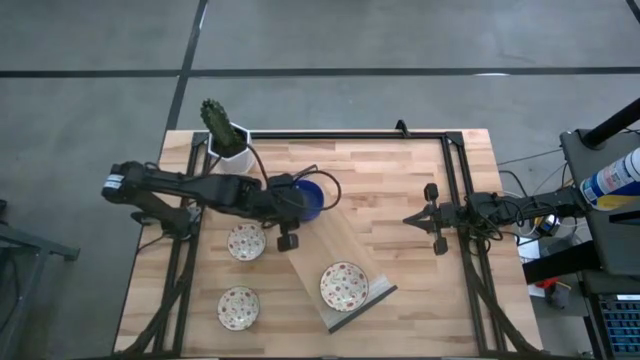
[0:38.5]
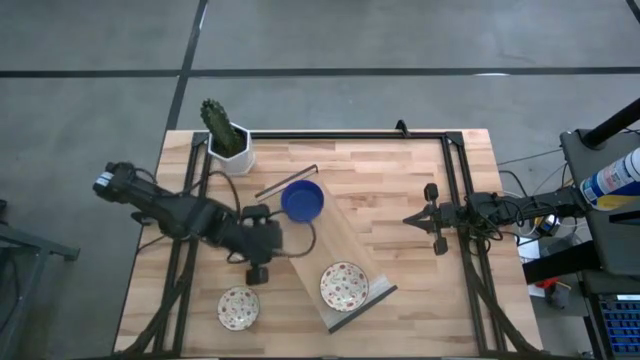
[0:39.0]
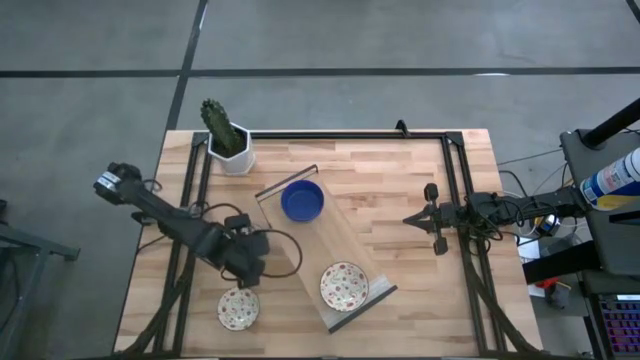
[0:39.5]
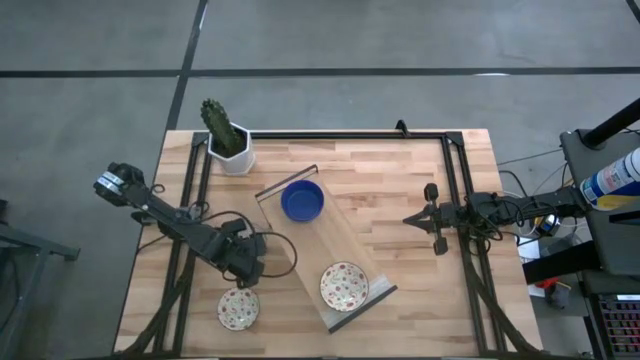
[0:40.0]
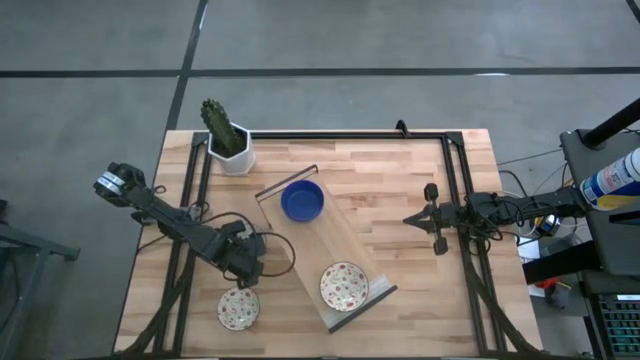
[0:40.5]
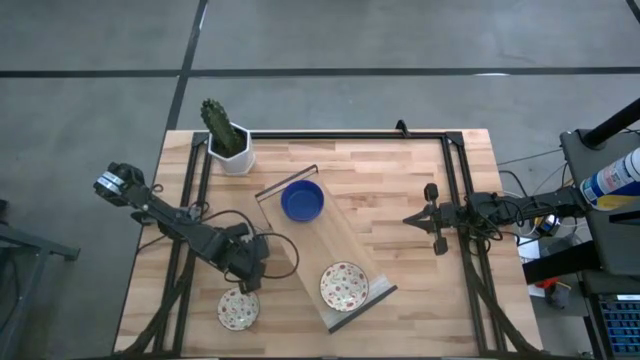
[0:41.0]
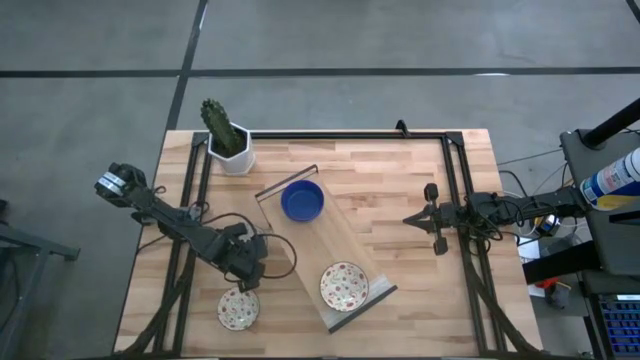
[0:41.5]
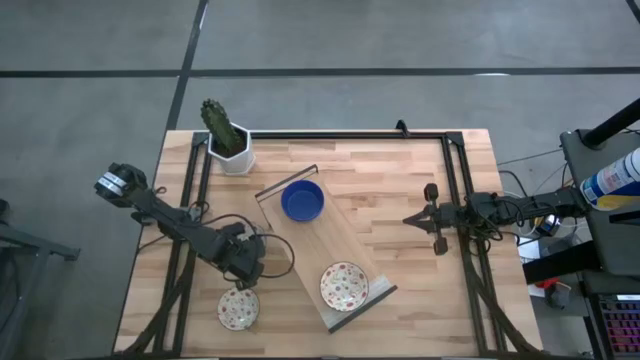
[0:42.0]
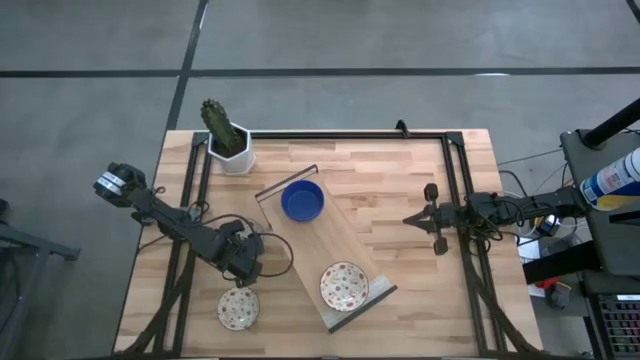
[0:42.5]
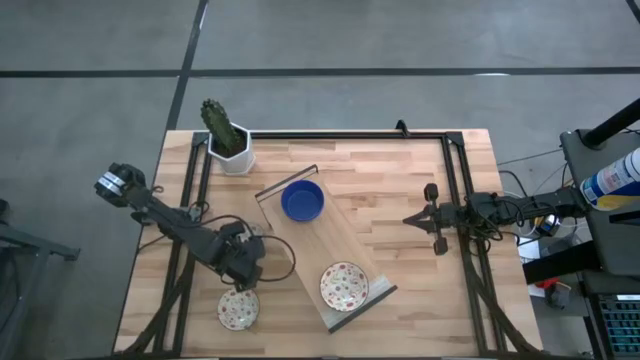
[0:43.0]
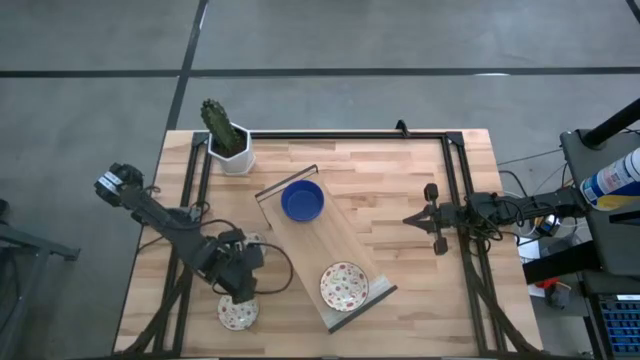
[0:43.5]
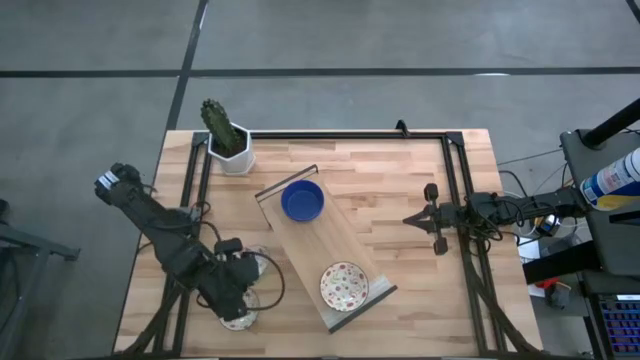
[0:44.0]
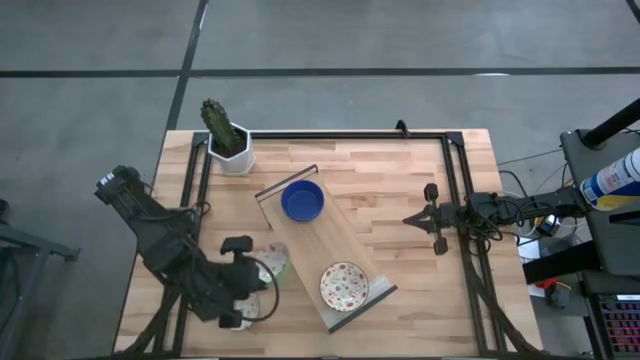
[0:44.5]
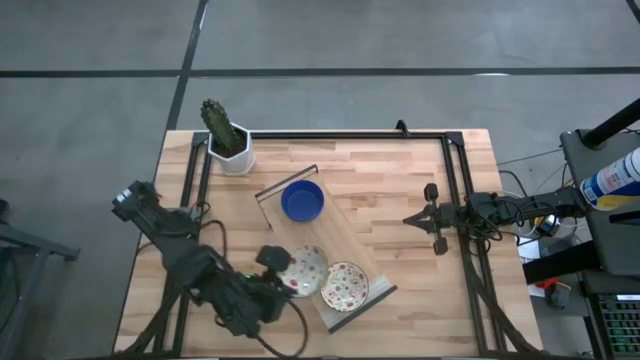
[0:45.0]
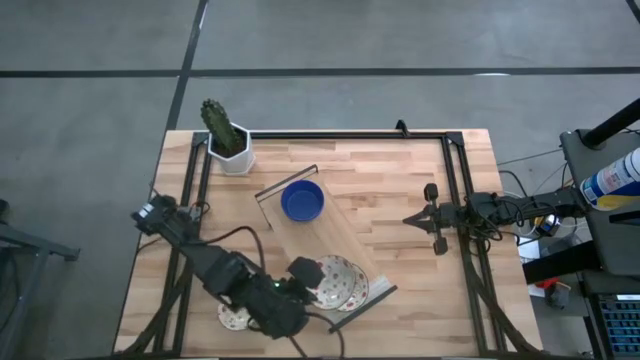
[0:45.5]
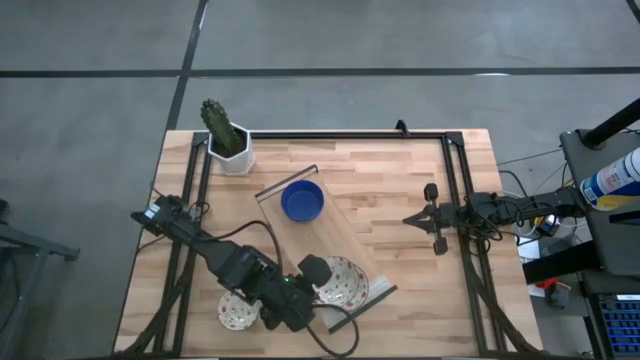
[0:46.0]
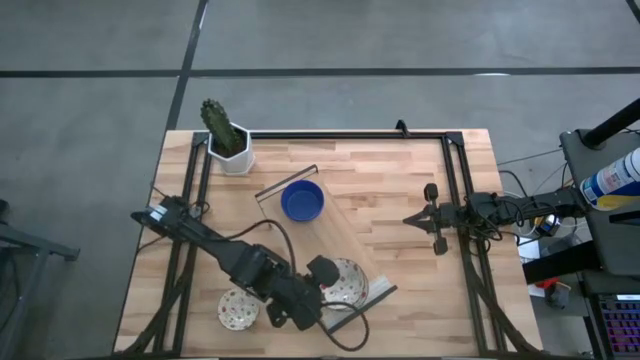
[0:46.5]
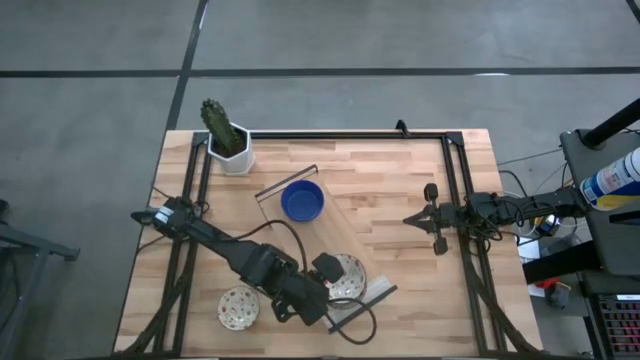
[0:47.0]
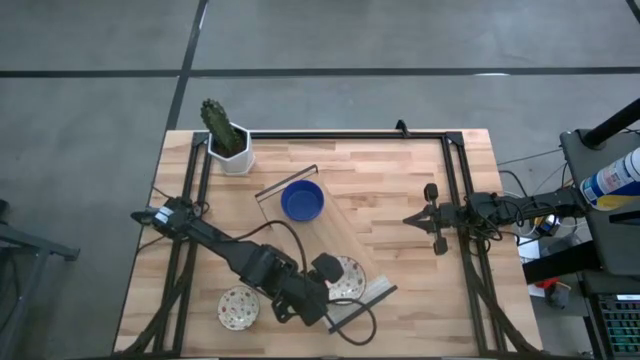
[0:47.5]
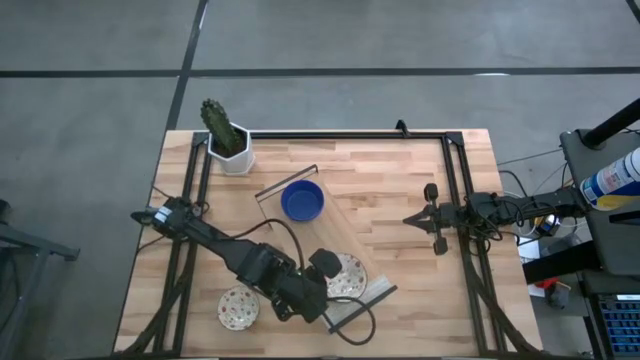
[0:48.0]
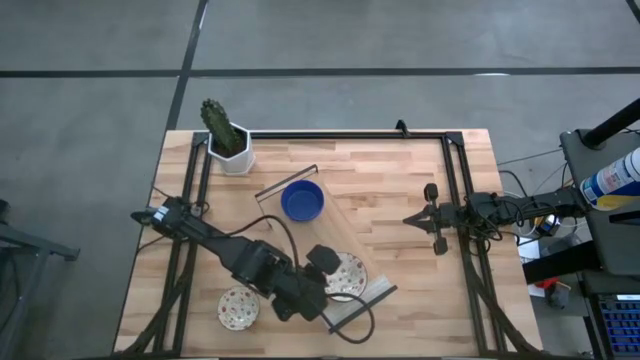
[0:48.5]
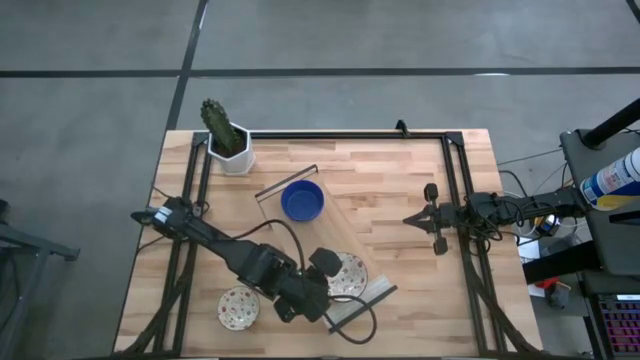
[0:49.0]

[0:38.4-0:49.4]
Task: Pick & Place Mini bowls
Stack the top white patterned bowl on the white patterned bowl on the shelf

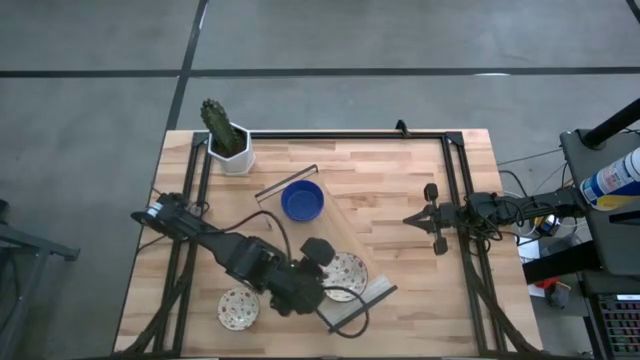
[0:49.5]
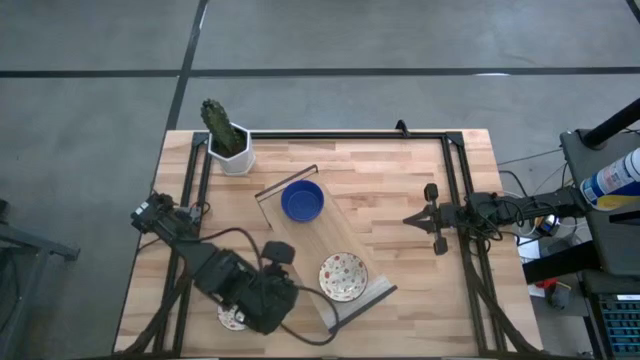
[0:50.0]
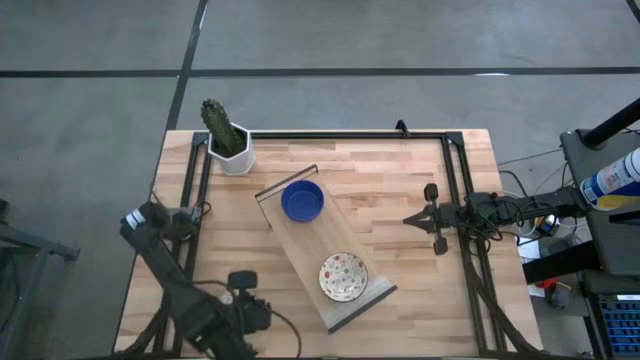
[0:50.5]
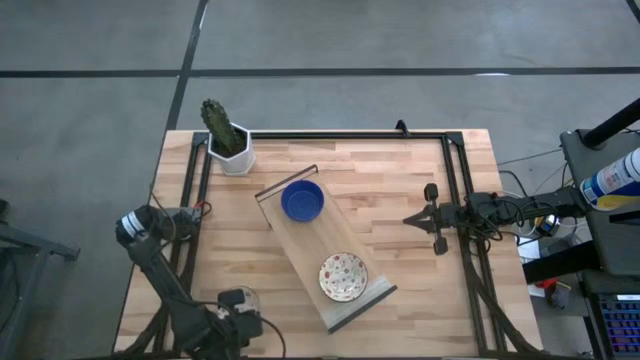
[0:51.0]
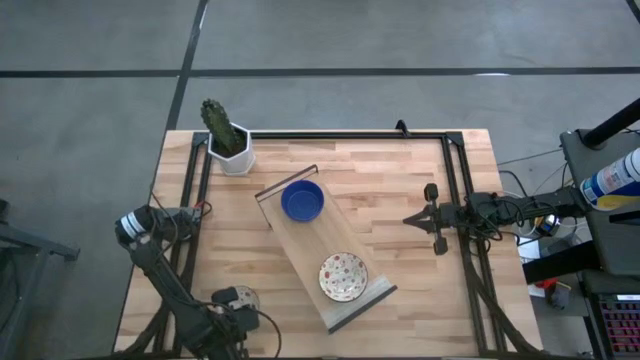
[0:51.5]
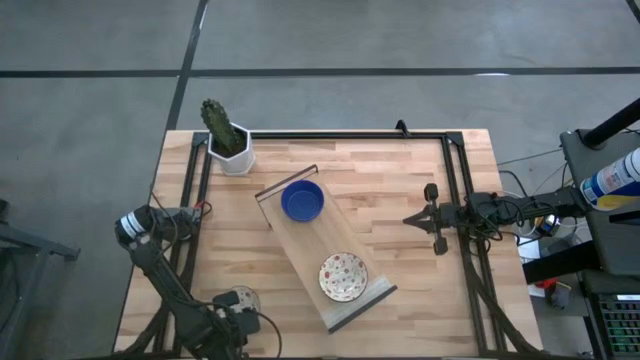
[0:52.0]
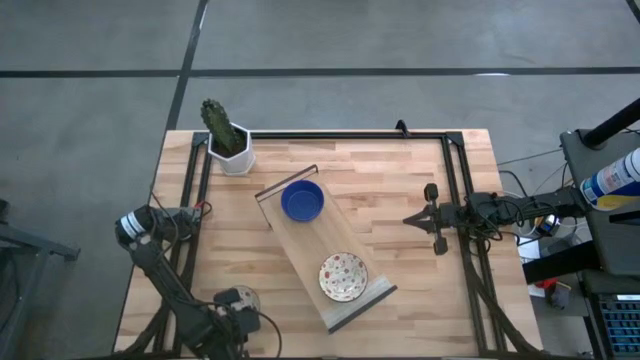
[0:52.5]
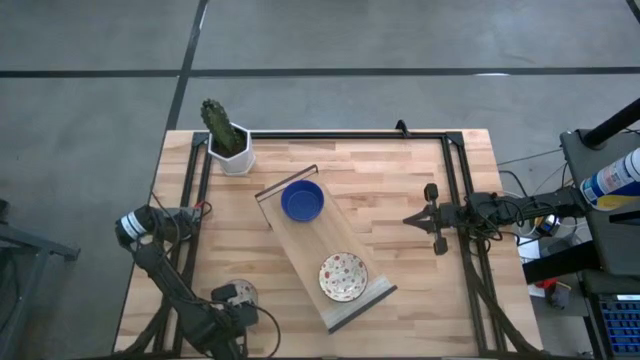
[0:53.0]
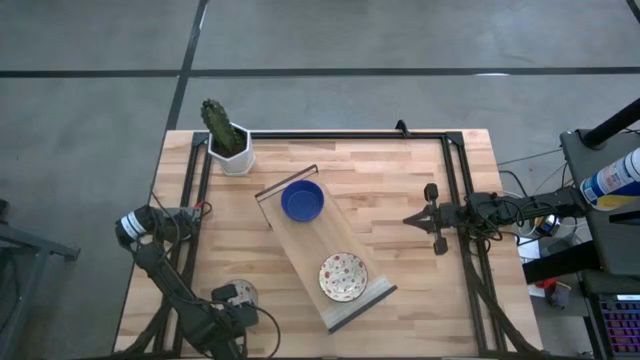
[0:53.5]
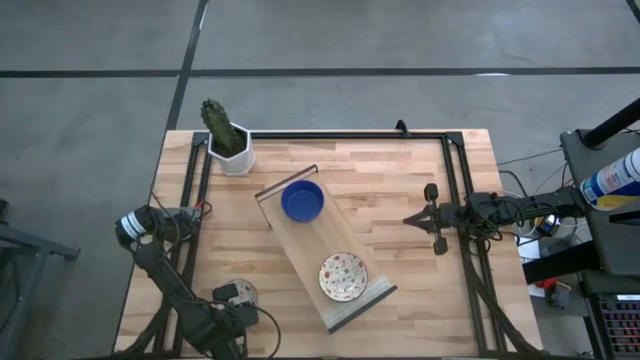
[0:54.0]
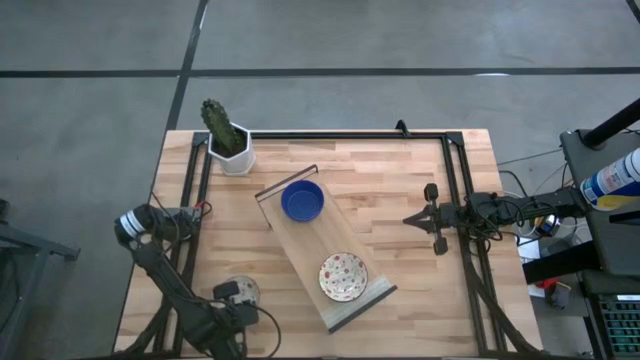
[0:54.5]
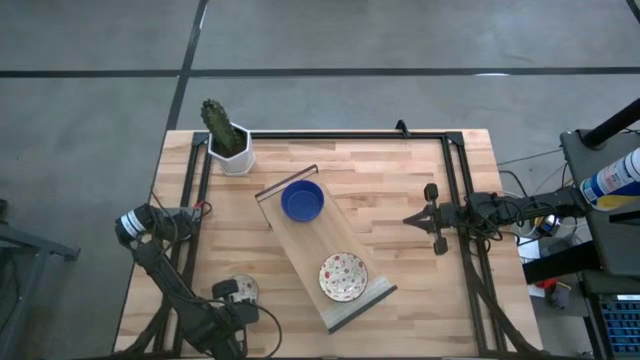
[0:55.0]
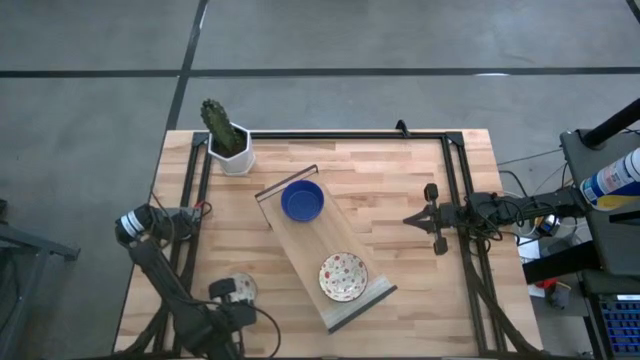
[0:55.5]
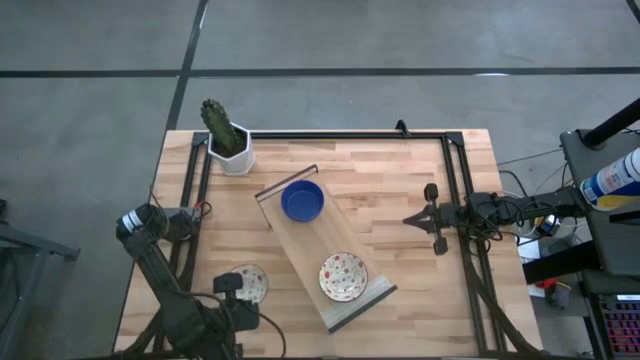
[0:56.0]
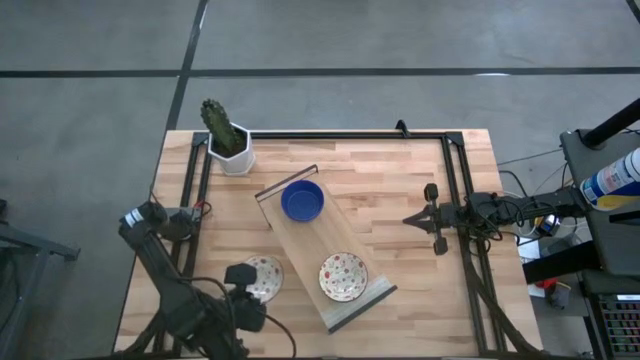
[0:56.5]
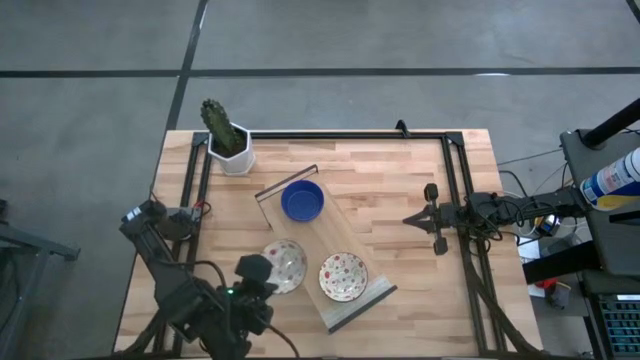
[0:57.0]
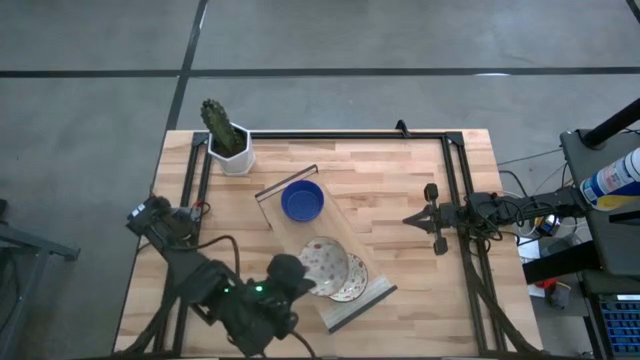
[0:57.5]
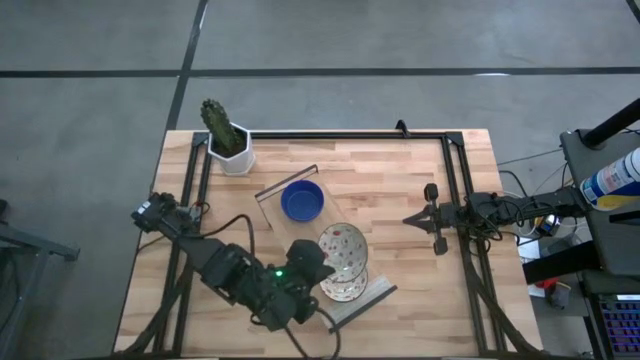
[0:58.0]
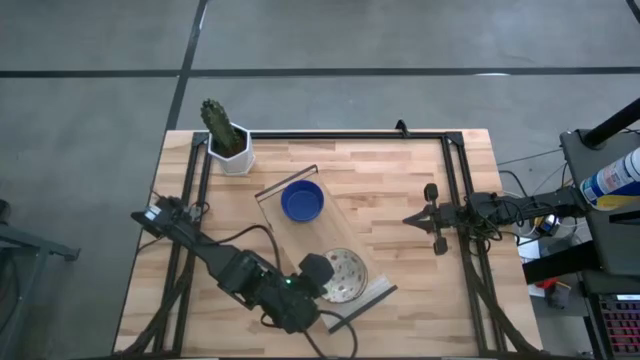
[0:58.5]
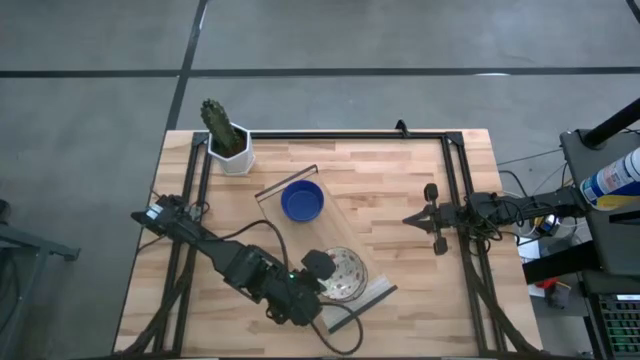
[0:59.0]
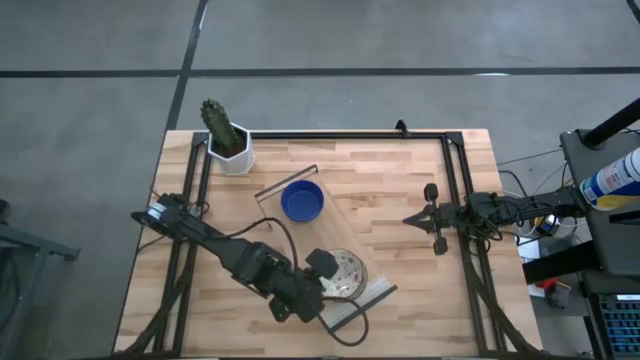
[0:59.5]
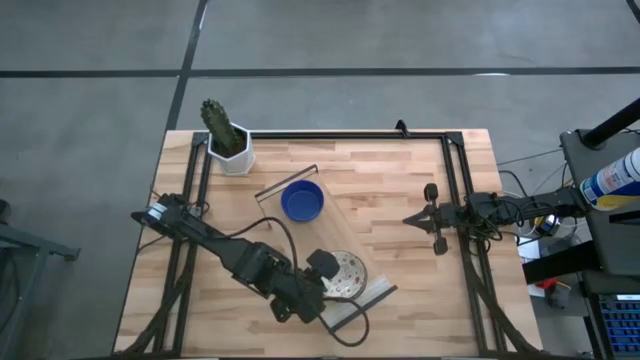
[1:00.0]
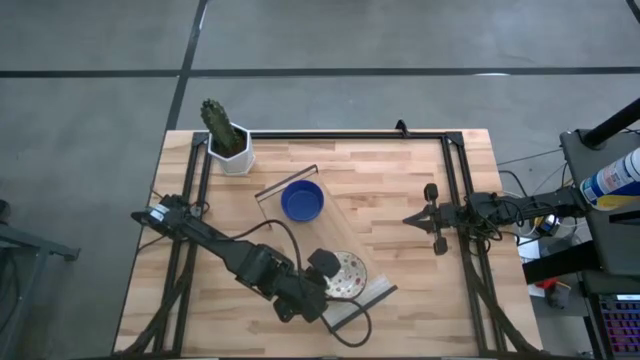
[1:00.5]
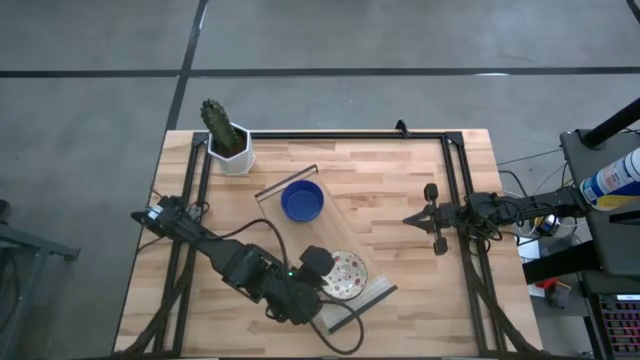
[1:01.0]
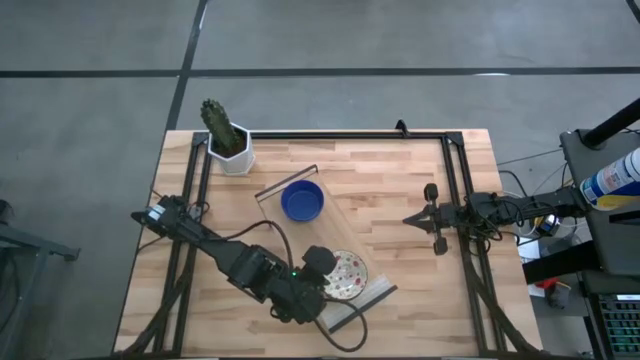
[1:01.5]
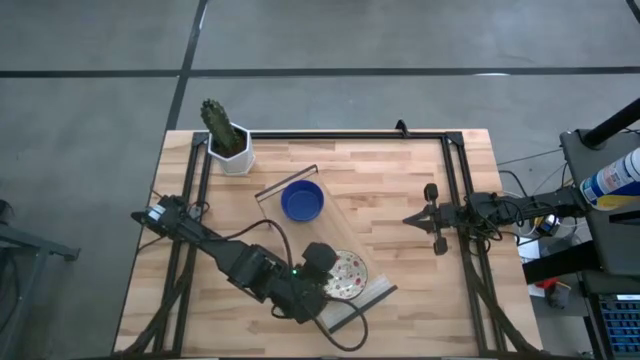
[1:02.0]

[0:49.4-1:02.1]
Stack the white patterned bowl on the white patterned bowl on the shelf
